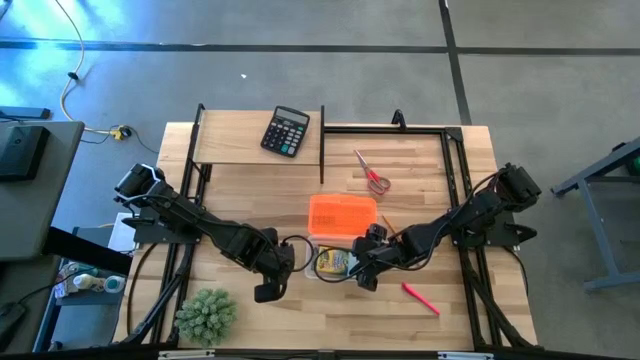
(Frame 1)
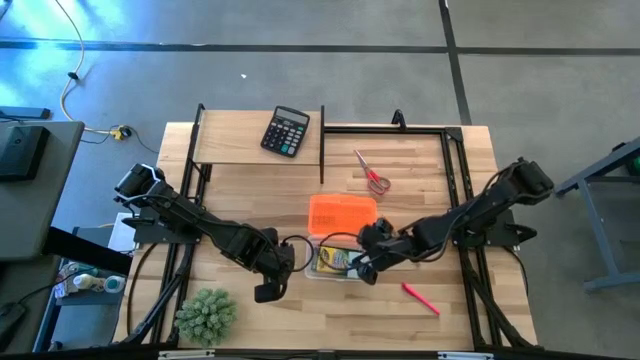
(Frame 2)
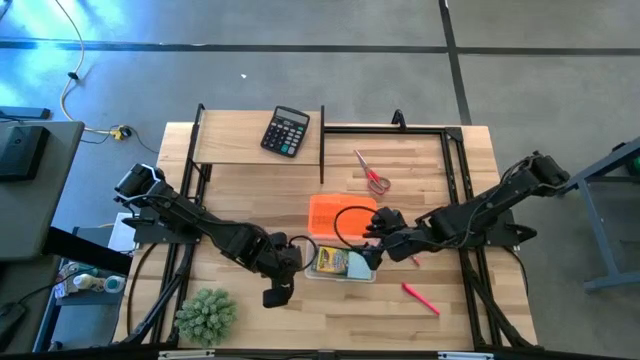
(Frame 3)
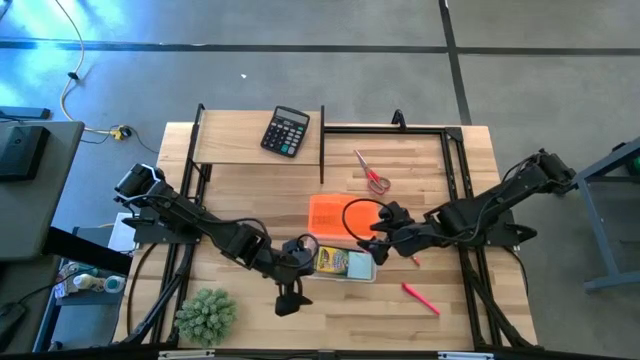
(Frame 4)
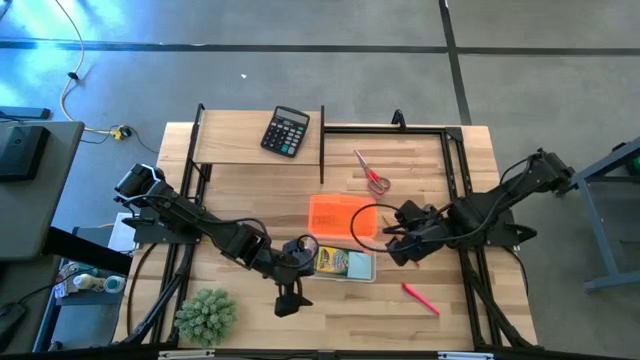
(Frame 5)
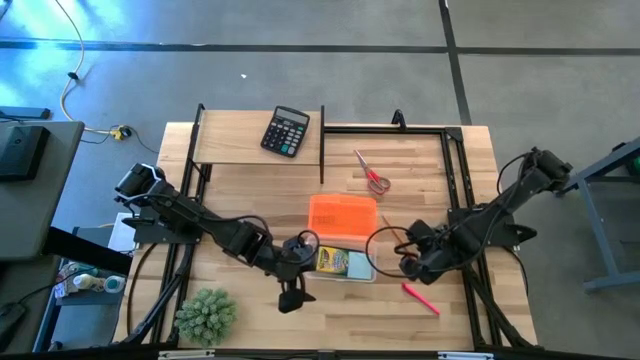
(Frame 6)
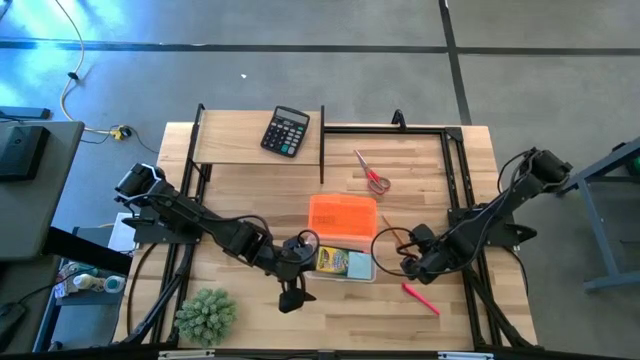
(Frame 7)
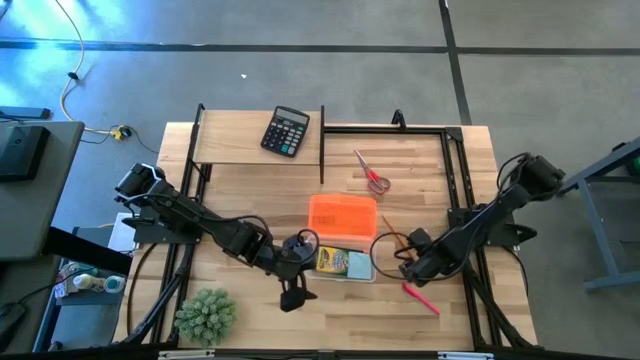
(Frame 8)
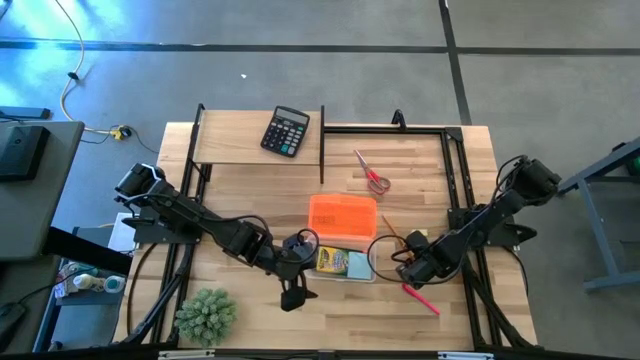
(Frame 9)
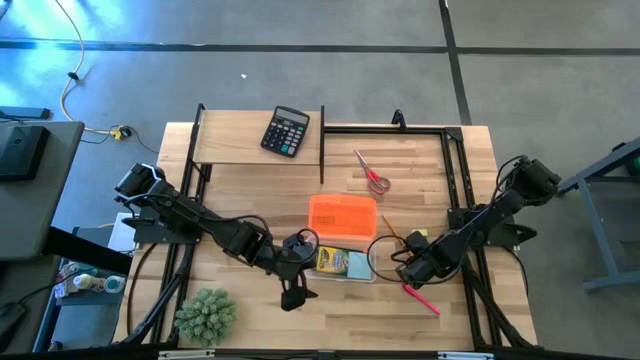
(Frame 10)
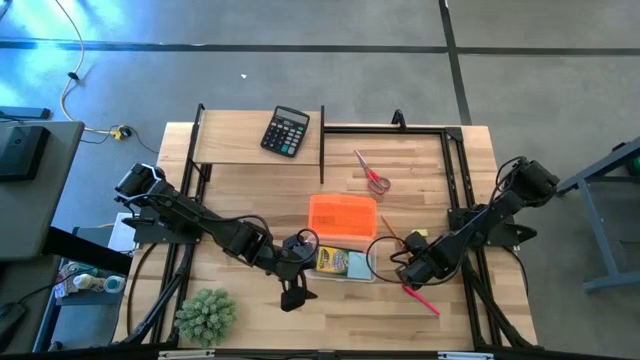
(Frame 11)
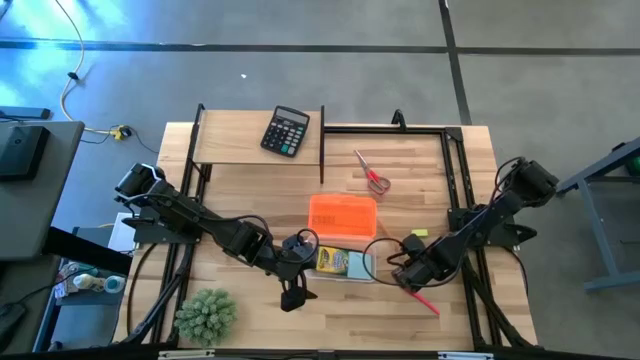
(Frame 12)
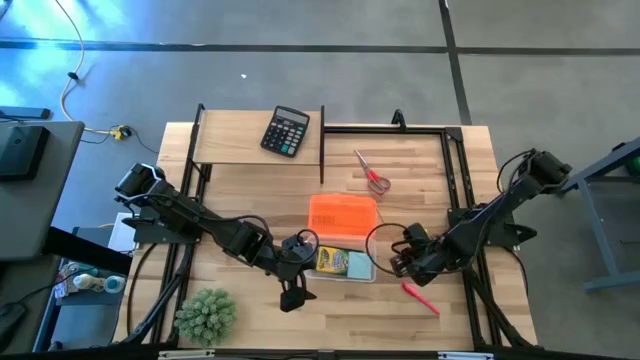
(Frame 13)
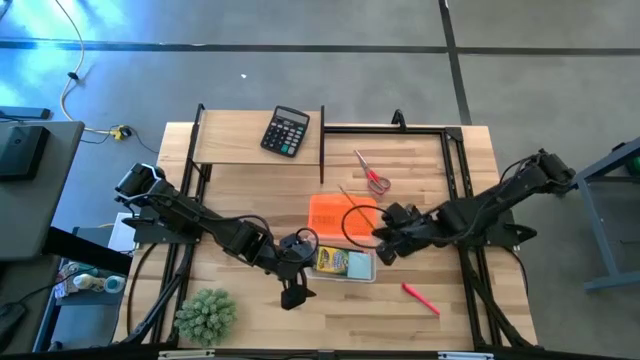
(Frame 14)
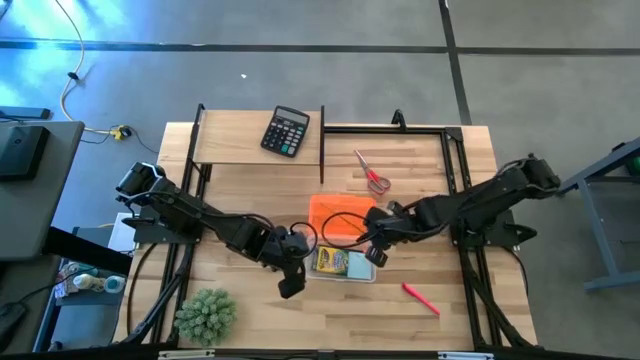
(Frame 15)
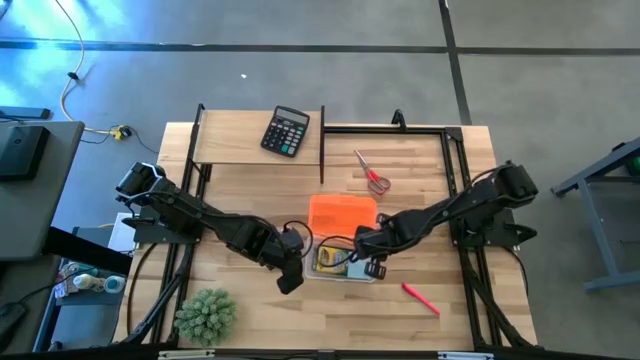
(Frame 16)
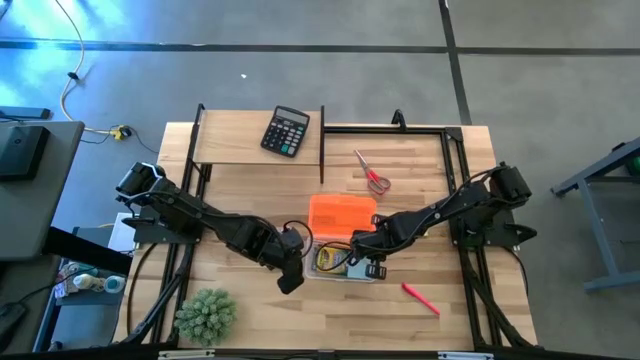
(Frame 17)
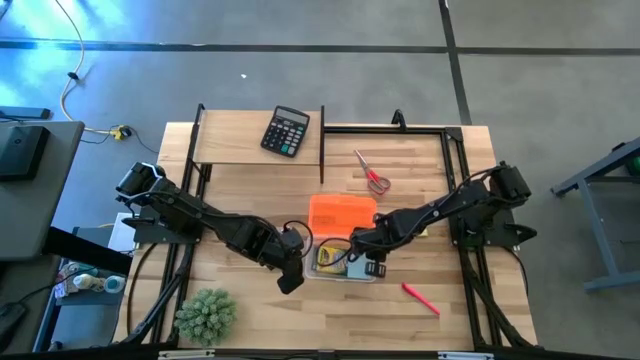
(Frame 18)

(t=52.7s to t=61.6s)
Task: Pack school essentials
Put the yellow pencil into the supply box

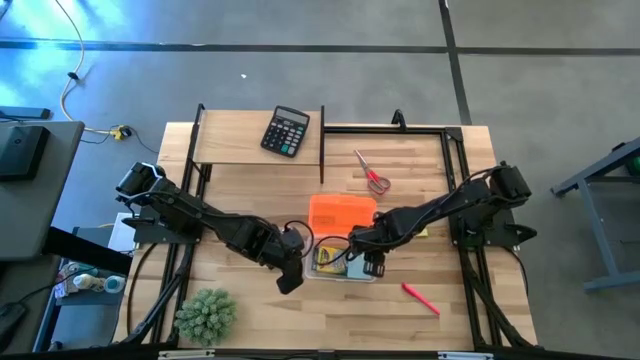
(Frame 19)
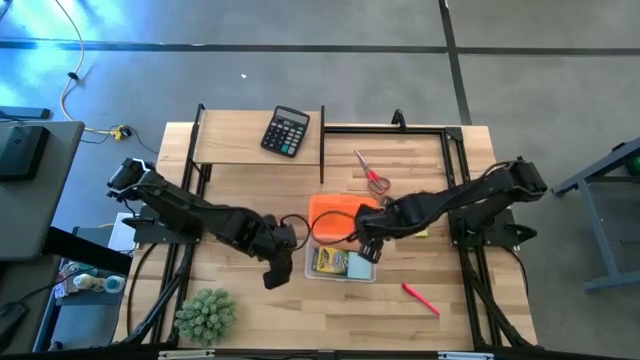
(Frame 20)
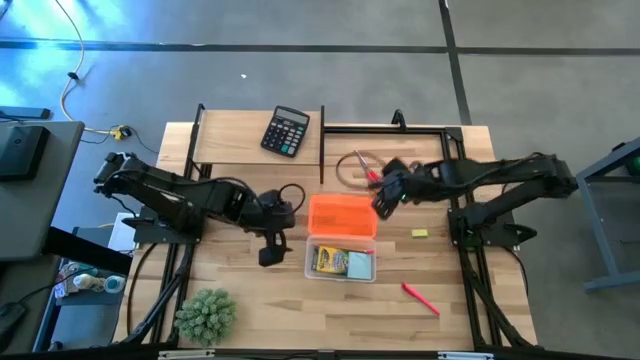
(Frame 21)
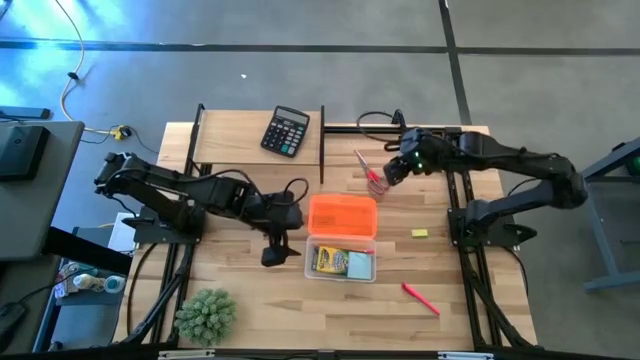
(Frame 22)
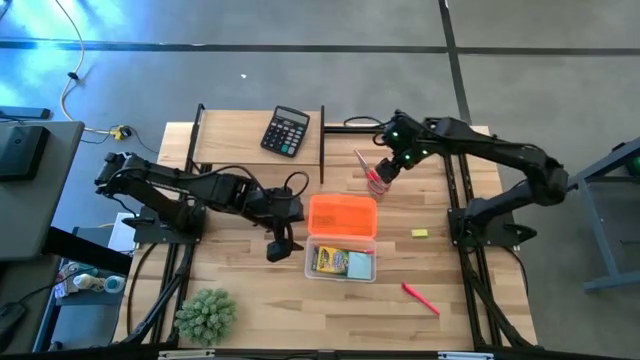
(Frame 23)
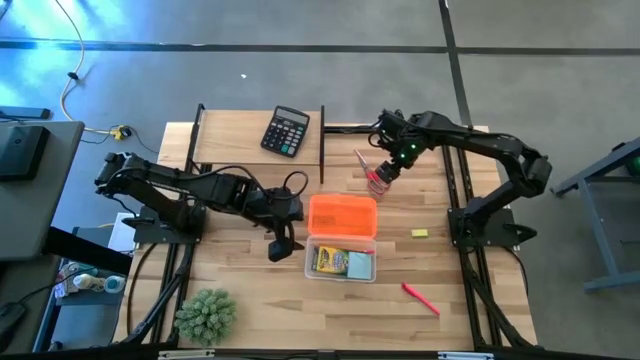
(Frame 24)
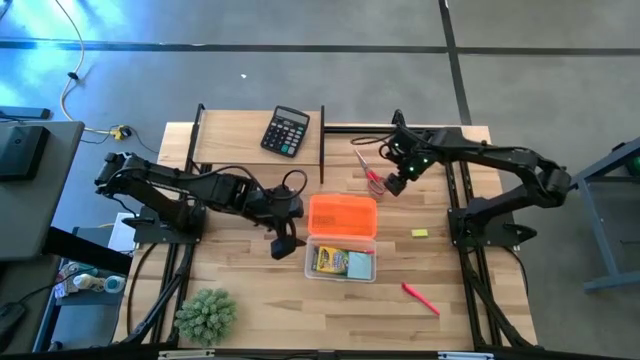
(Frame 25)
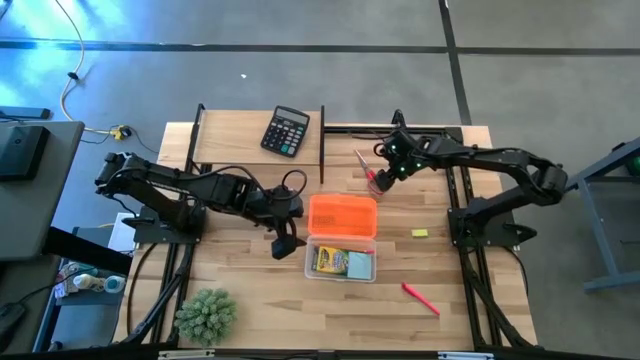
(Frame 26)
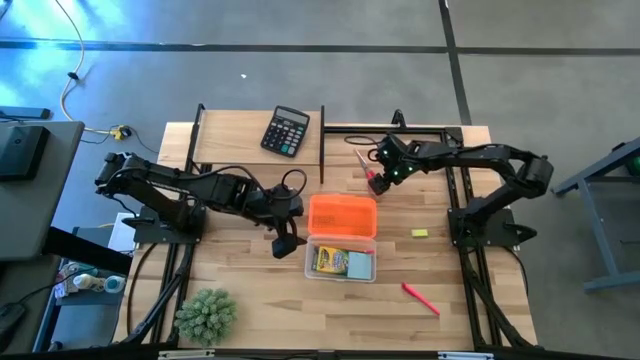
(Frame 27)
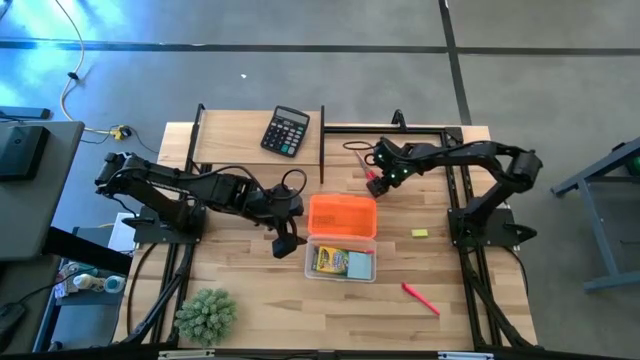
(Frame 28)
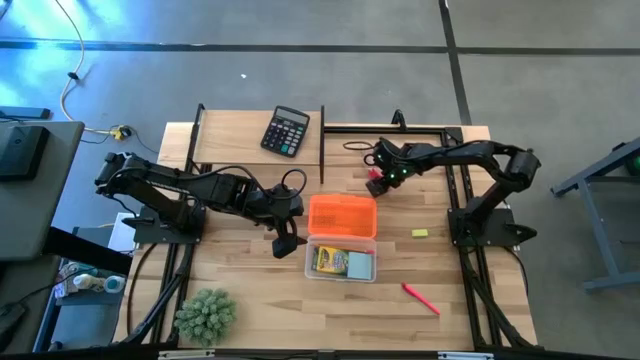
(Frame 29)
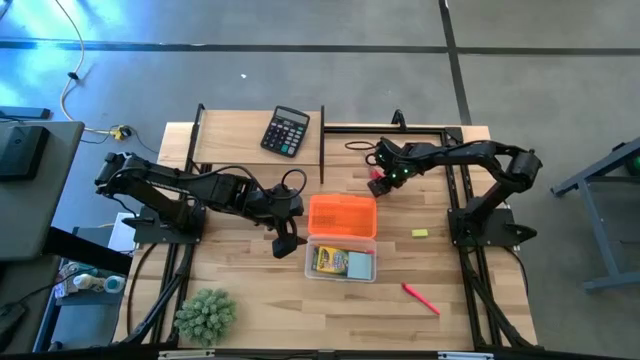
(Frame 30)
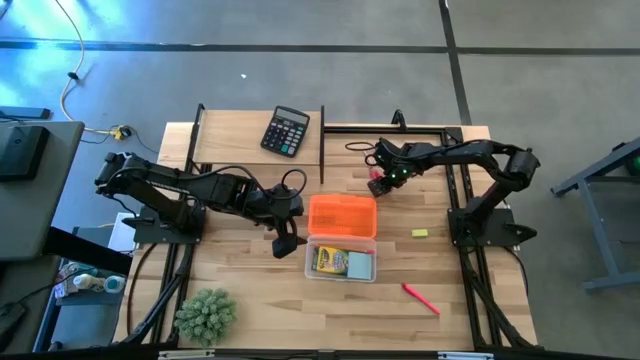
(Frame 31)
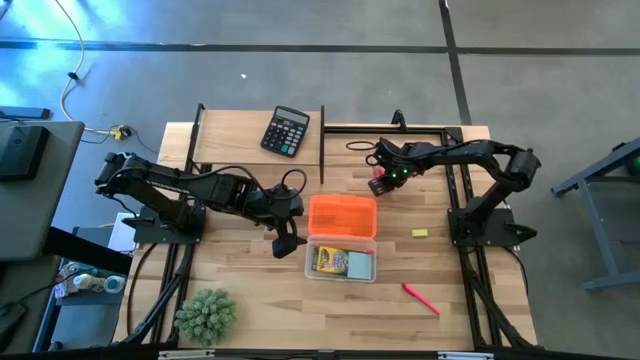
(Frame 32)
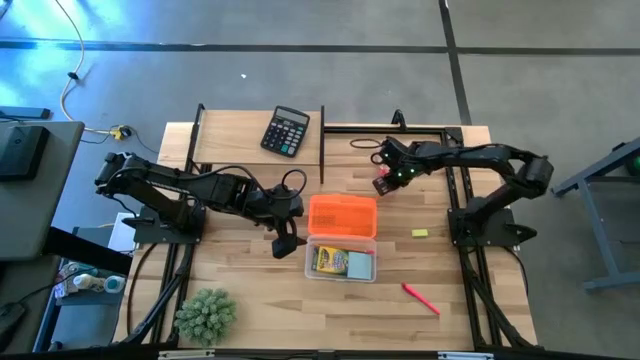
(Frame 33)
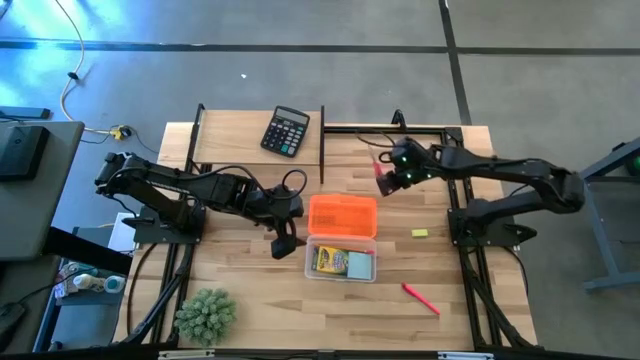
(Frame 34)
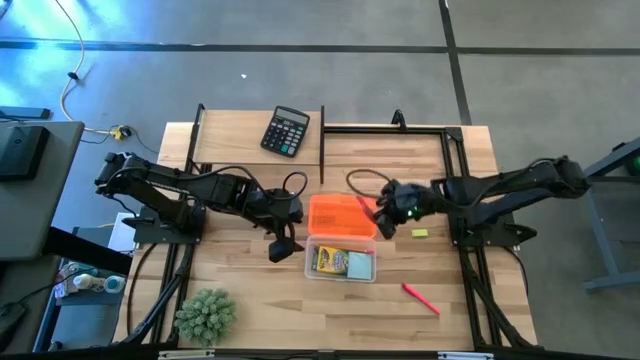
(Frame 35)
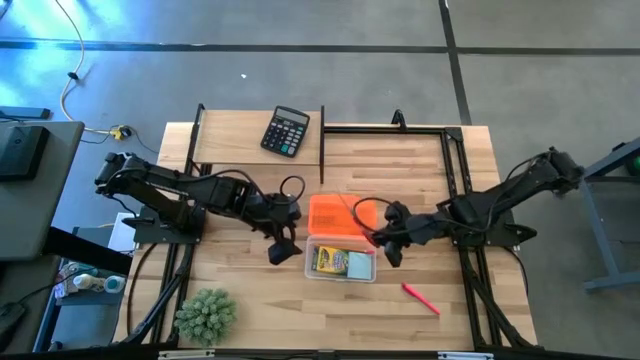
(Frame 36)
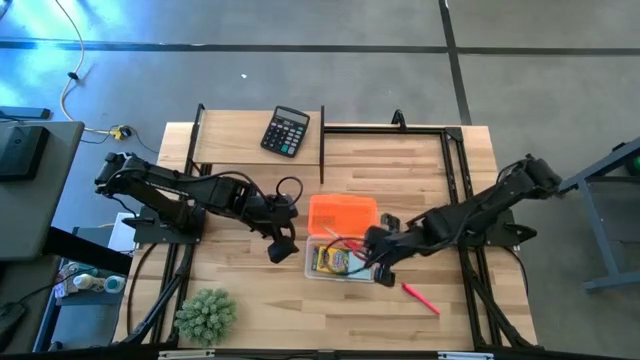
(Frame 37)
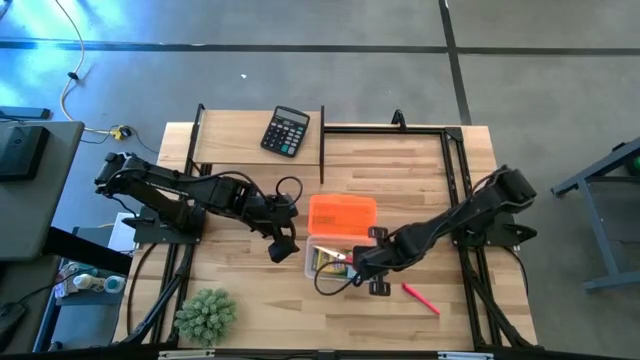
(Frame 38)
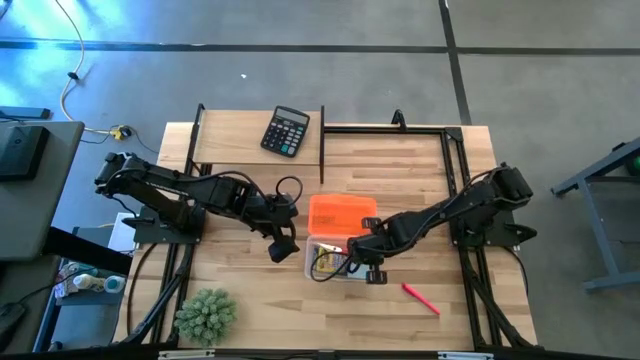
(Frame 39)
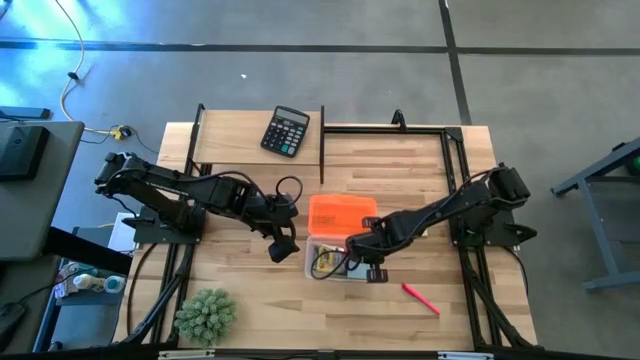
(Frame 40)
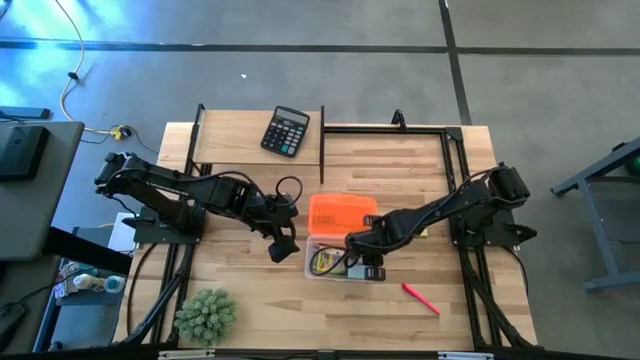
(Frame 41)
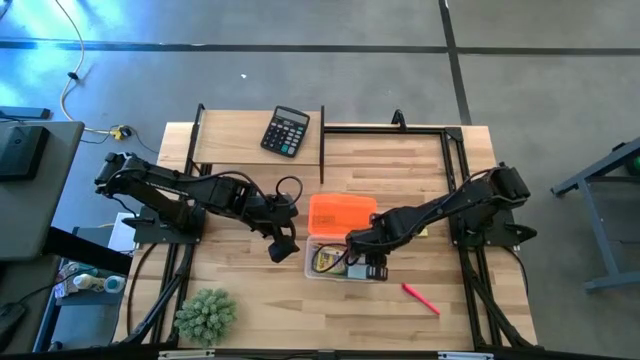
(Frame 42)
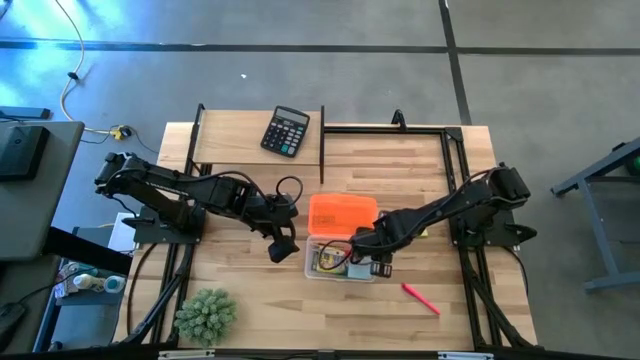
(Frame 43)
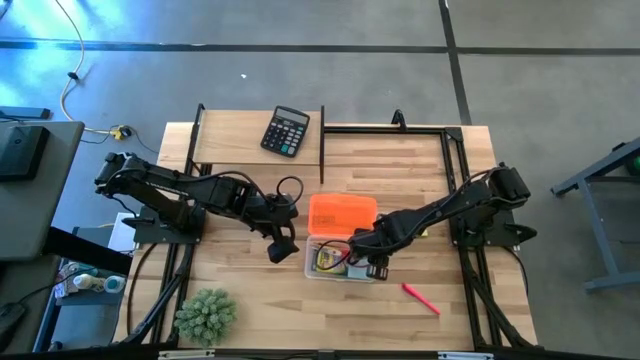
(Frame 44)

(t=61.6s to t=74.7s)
Put the red scissors into the supply box
